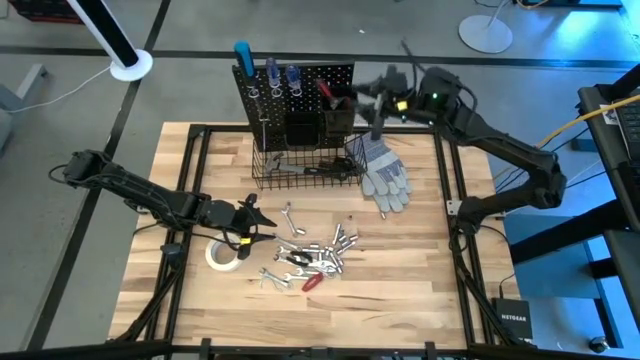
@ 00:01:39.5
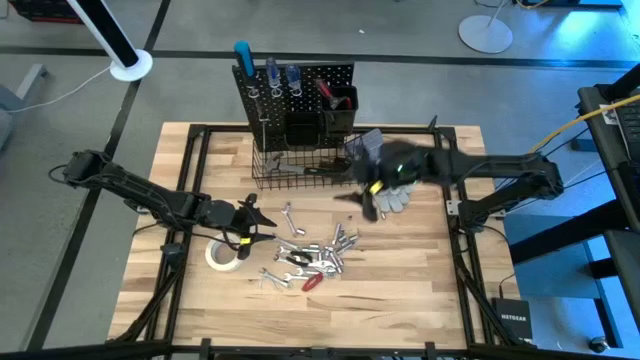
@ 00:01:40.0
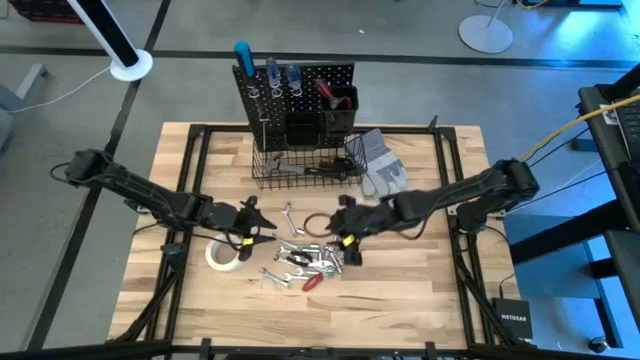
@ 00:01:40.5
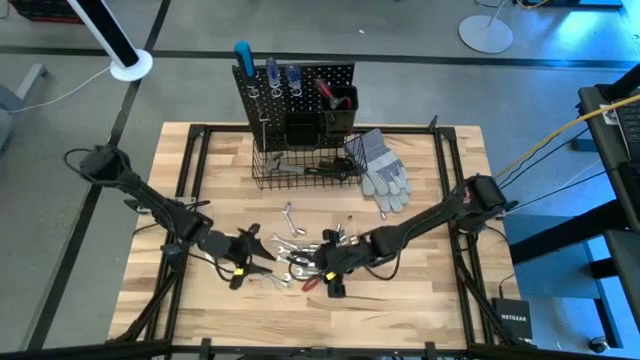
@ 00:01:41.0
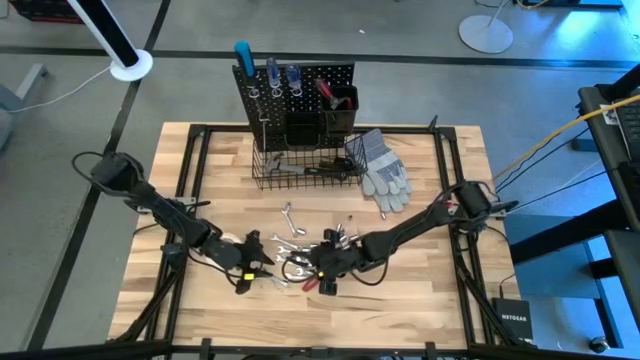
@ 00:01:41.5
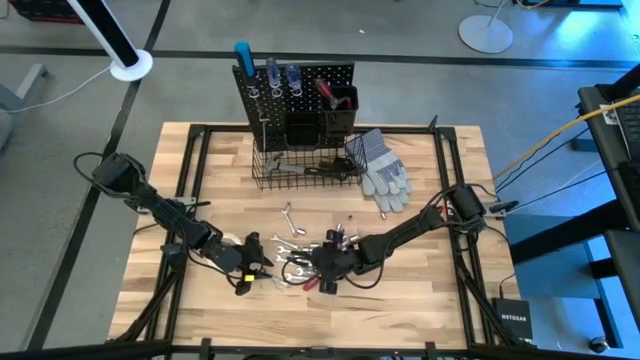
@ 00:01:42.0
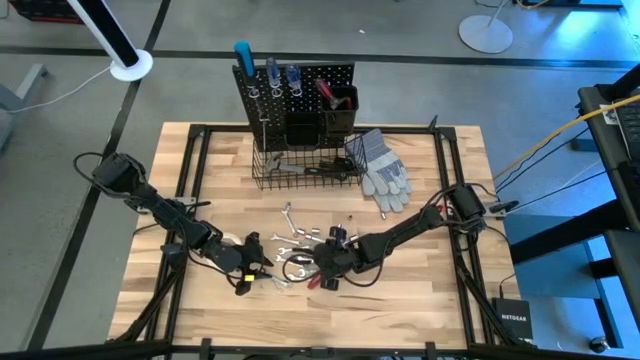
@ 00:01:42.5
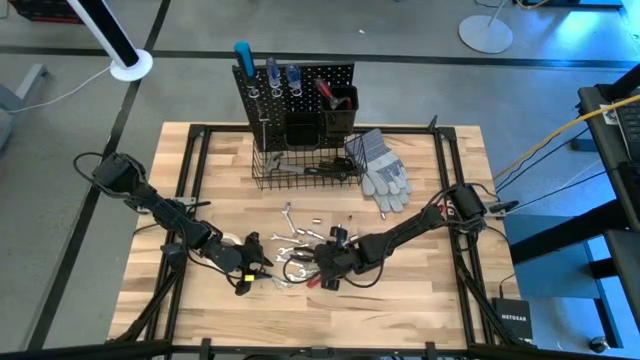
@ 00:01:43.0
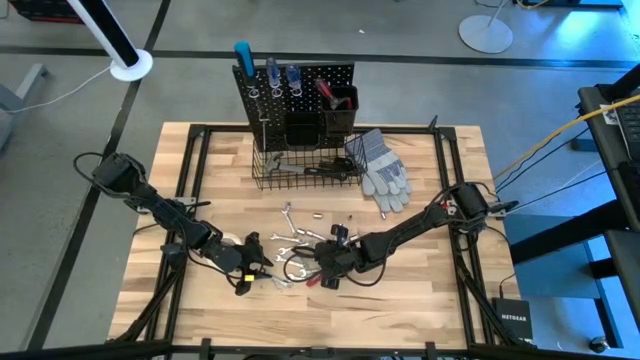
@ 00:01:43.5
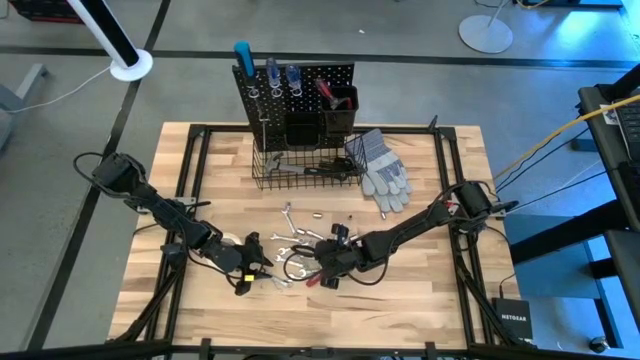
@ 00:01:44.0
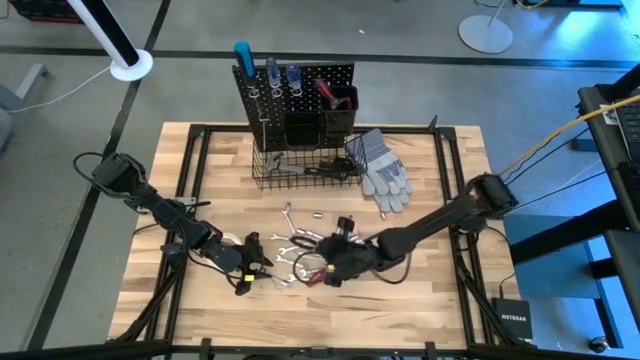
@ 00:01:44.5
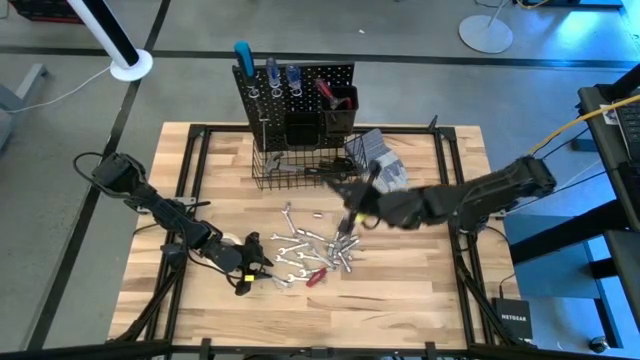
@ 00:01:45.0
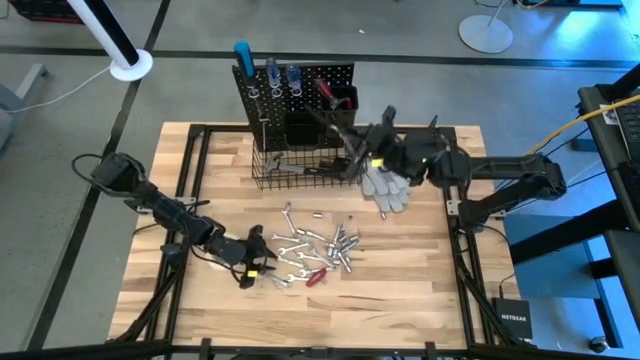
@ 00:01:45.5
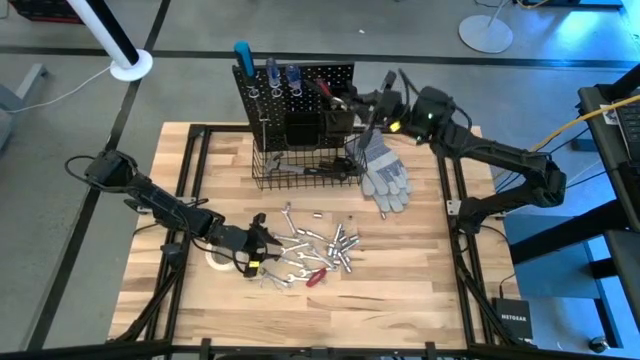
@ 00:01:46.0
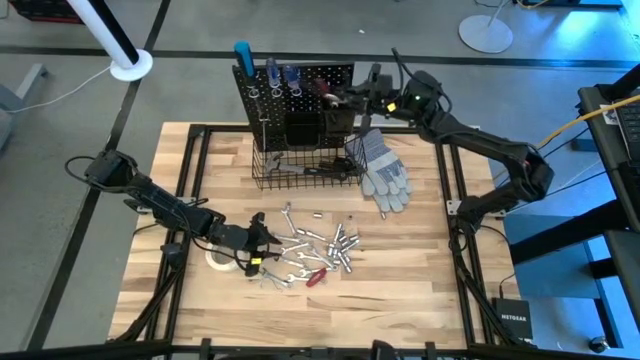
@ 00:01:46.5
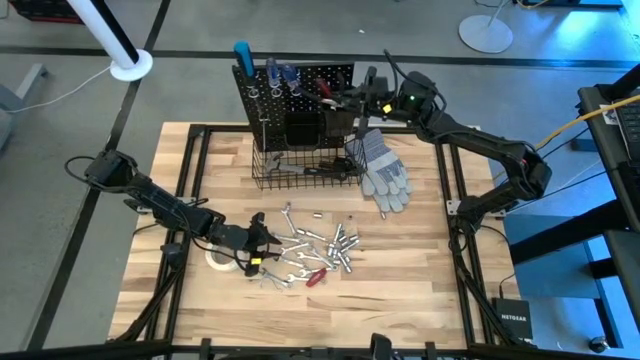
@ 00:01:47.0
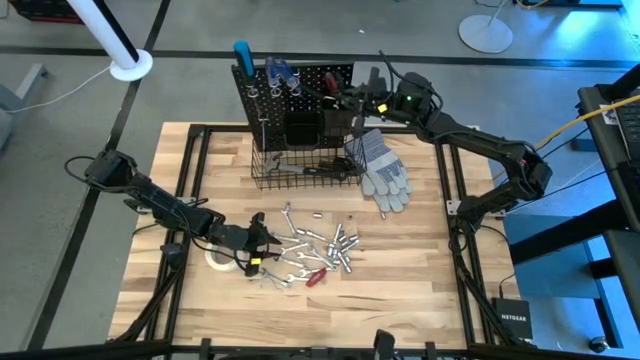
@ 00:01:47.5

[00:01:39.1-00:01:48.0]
Task: Hang tools onto peg board
Put the black slip-joint pliers into the right black bin on the peg board

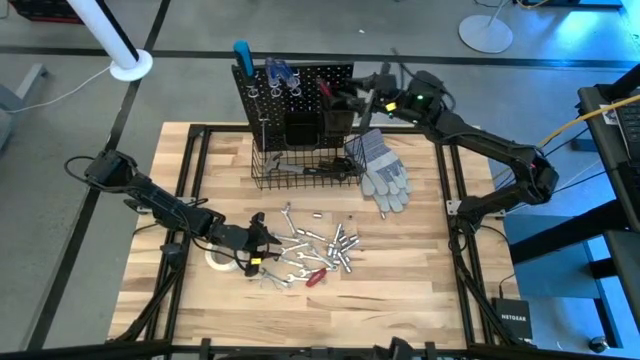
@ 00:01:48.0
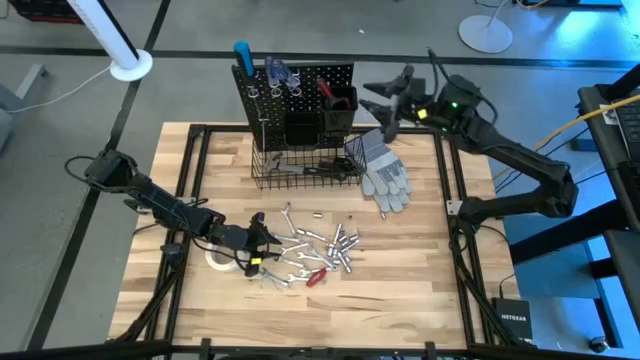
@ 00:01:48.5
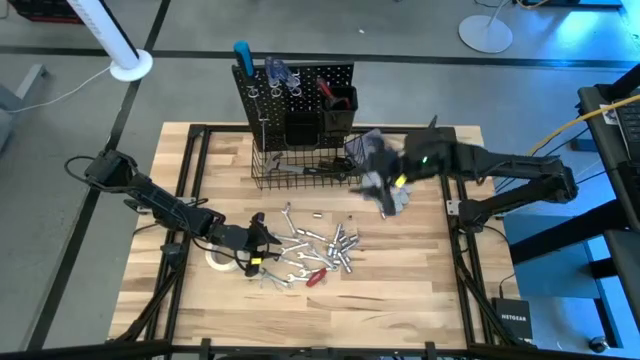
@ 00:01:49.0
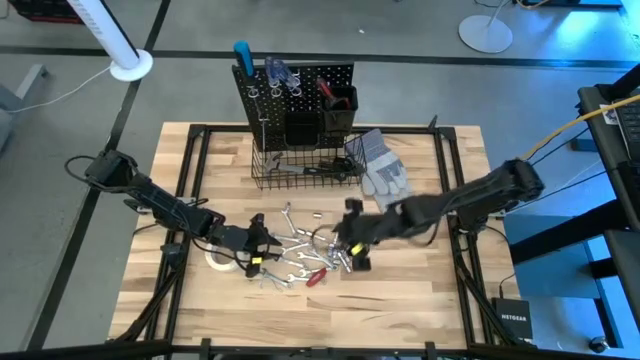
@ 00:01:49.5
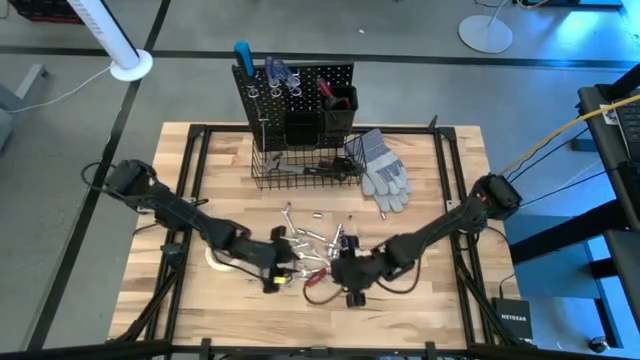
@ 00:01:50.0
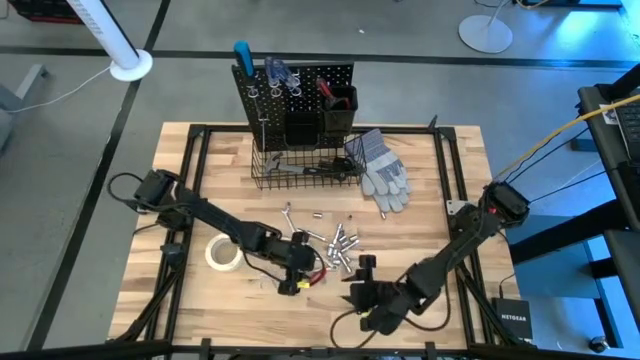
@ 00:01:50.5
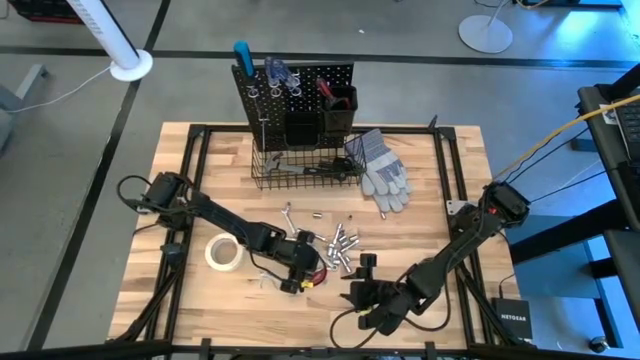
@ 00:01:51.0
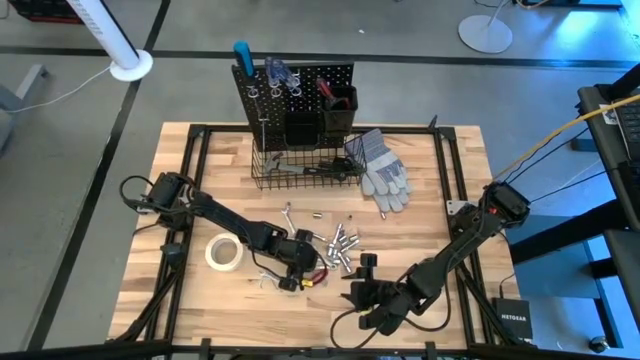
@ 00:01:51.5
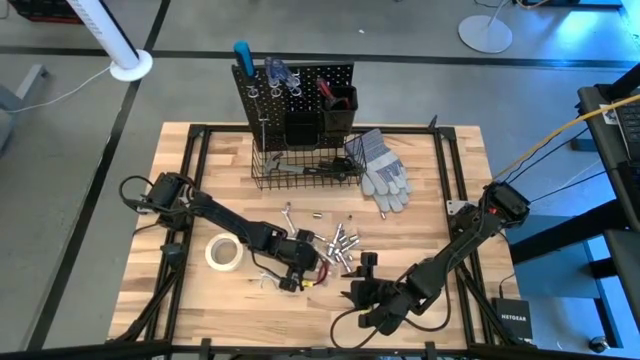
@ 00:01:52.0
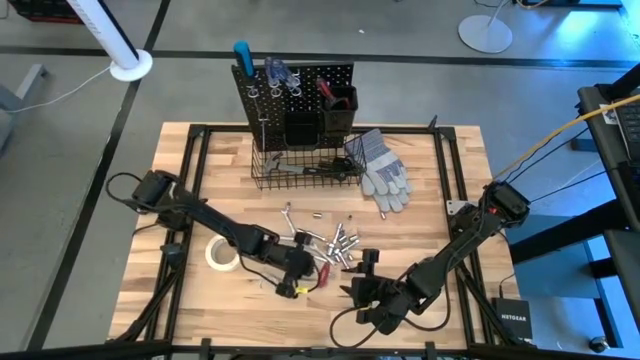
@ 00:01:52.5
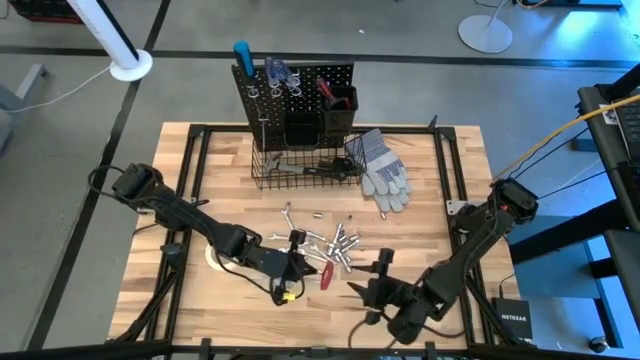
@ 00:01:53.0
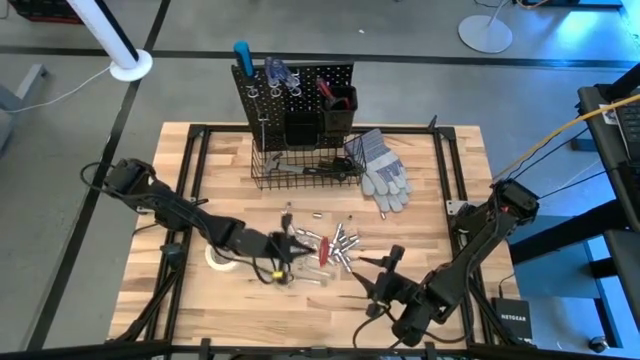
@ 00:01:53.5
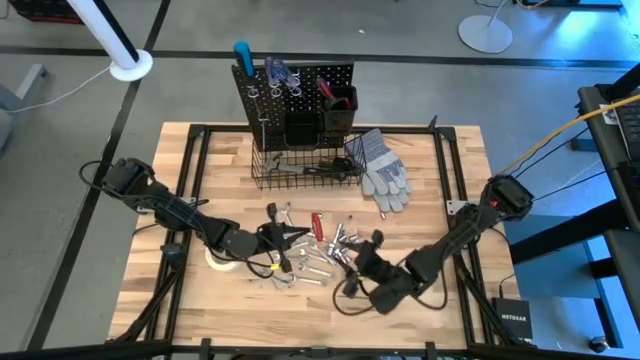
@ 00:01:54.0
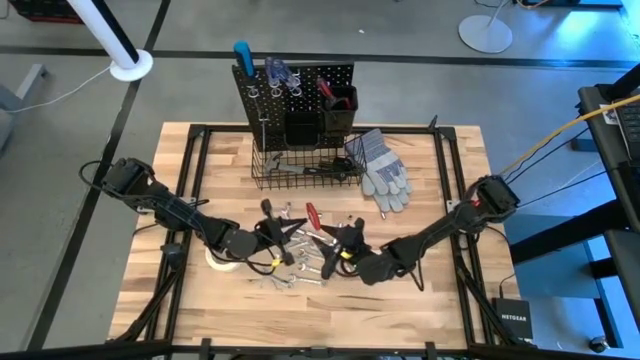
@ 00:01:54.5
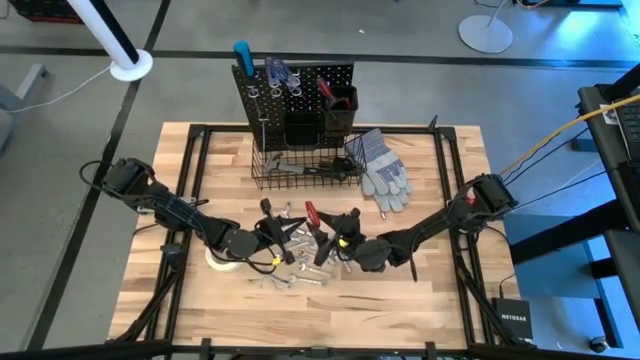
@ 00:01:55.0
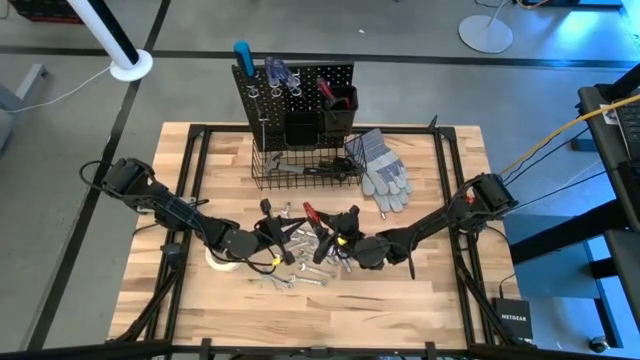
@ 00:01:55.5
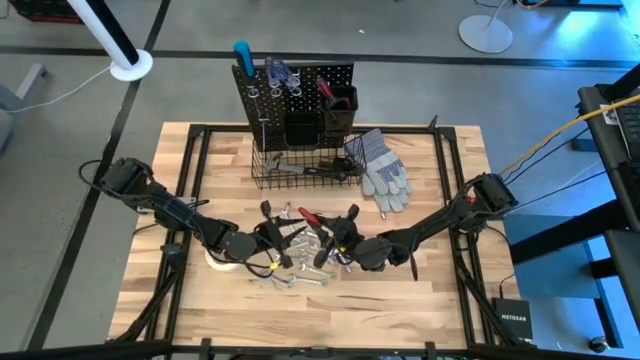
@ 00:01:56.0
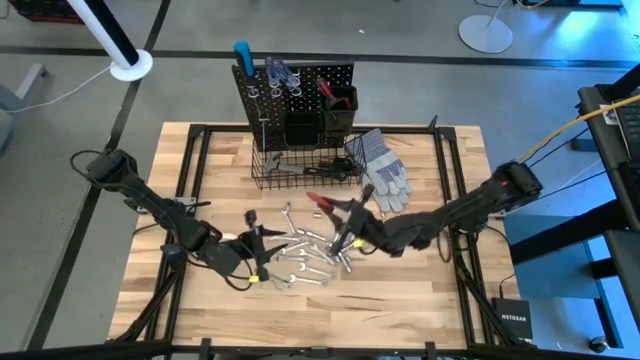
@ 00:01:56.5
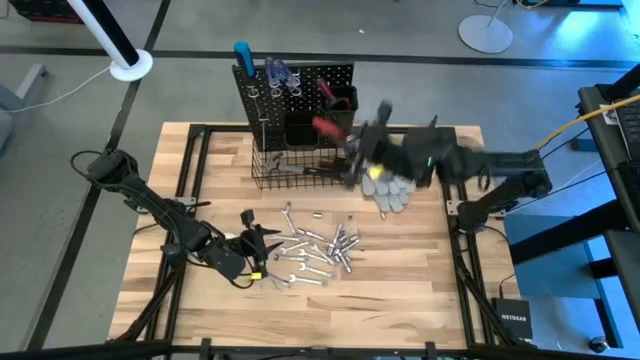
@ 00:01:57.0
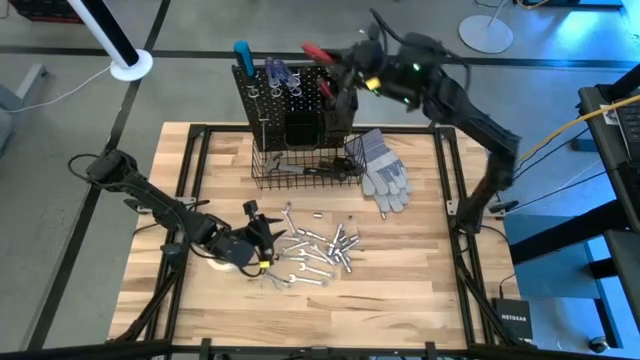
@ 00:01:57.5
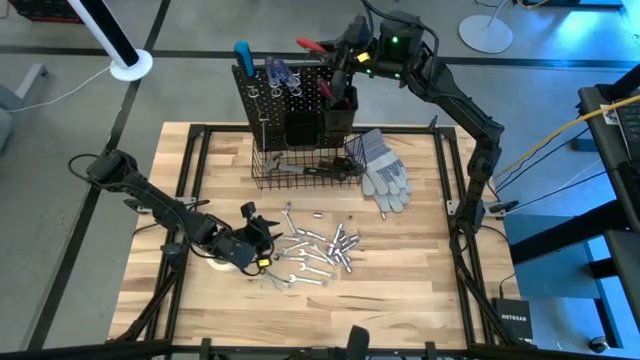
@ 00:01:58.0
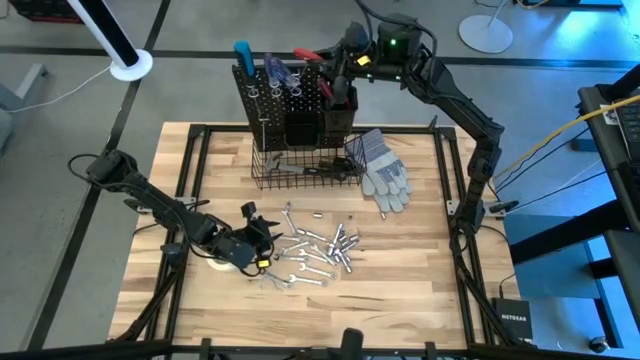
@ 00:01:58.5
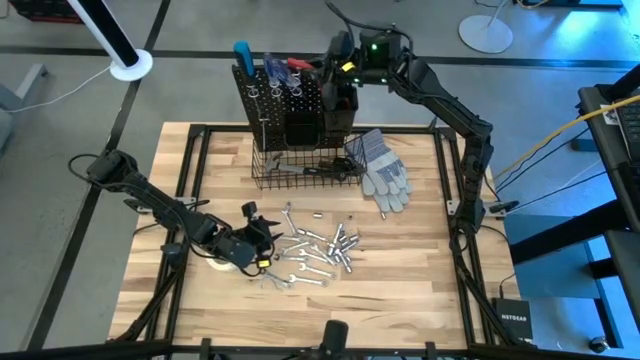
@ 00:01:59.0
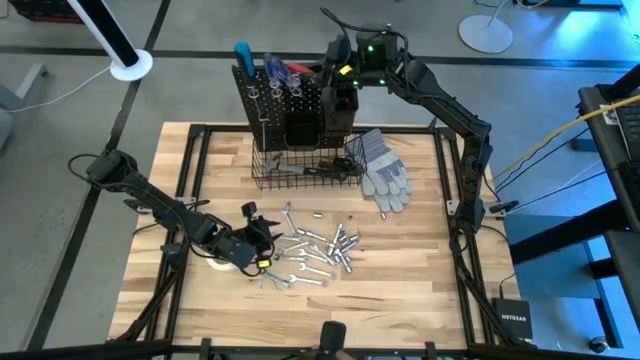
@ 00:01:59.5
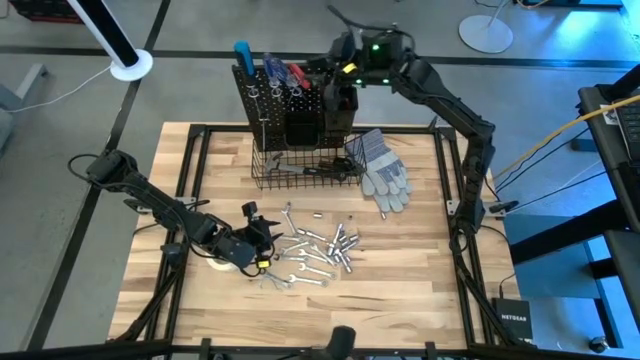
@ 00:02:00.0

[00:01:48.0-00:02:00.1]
Hang the red allen wrench on the peg board
